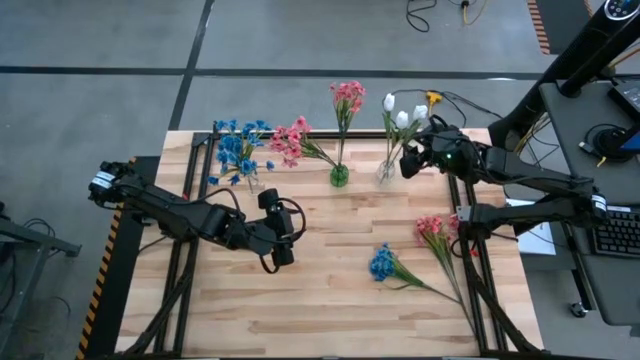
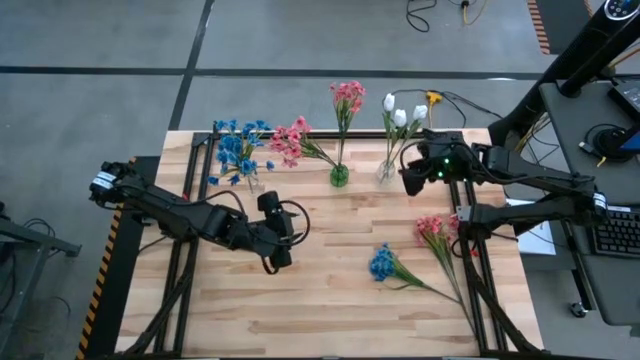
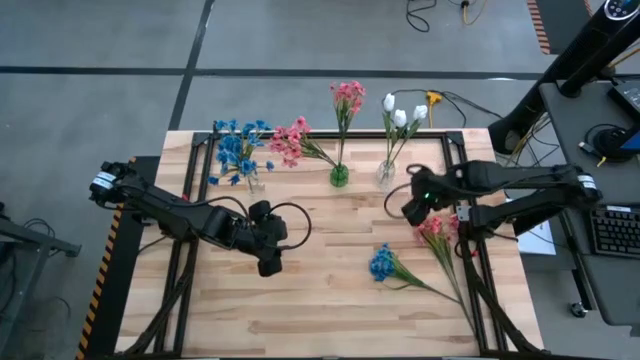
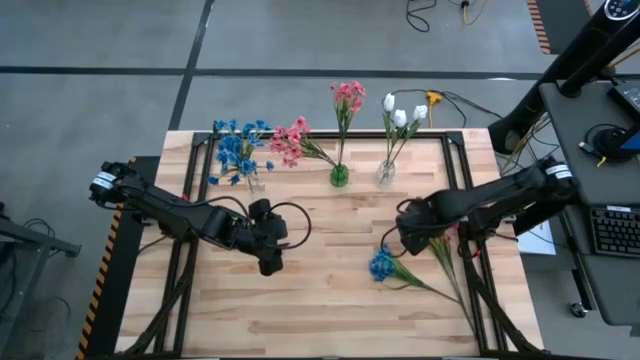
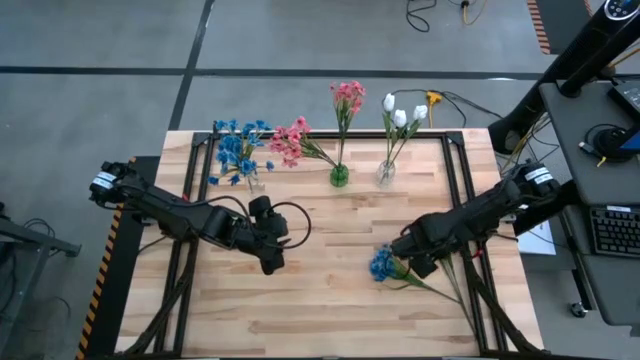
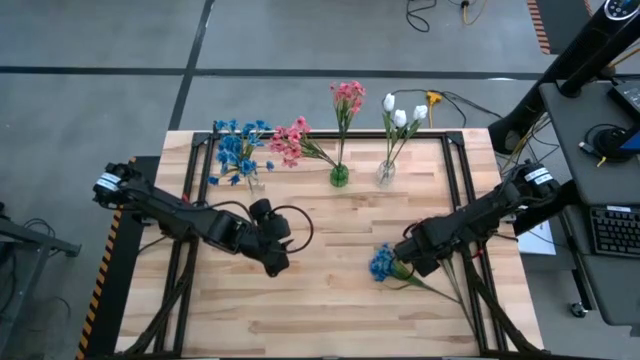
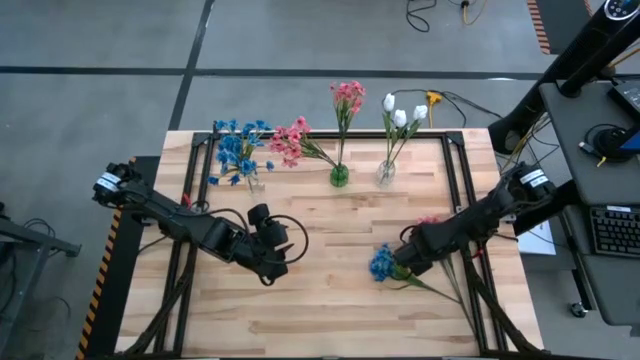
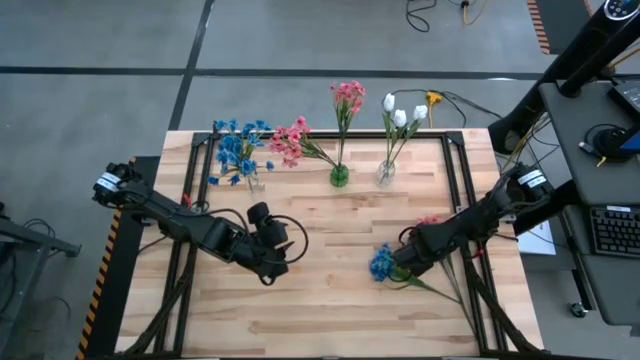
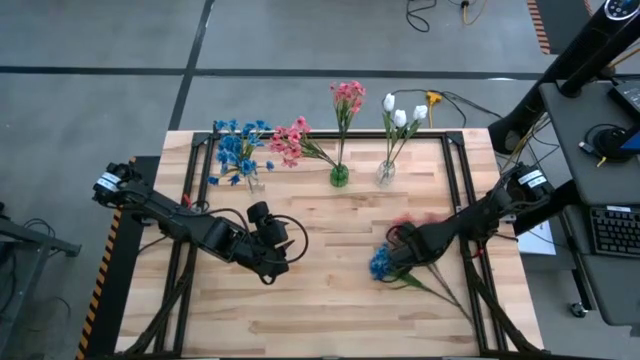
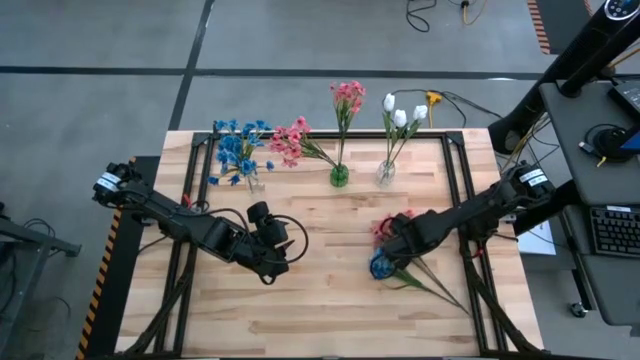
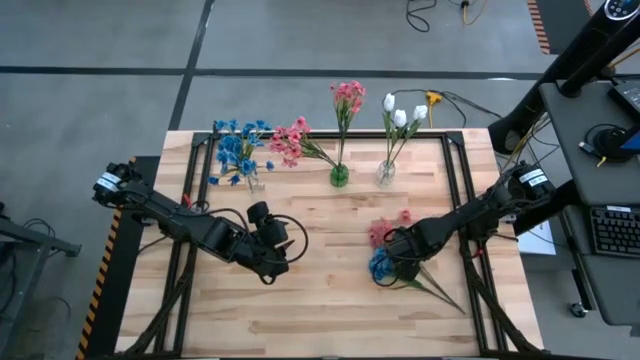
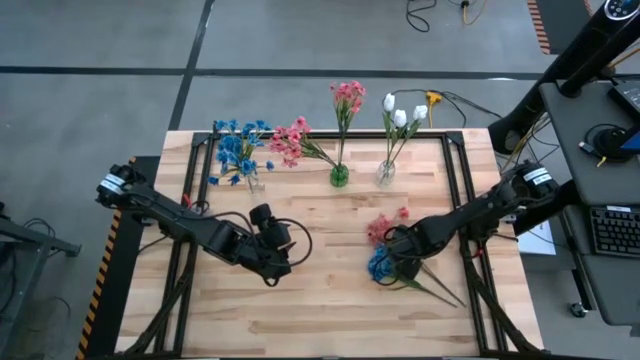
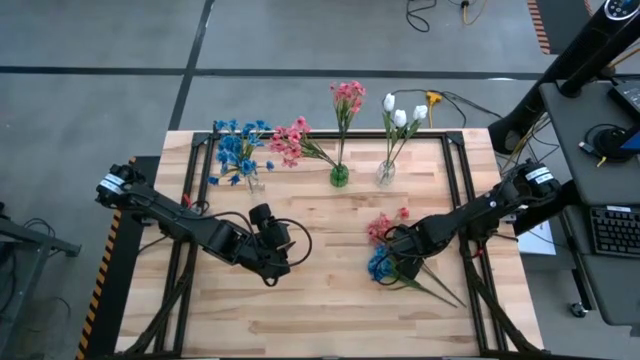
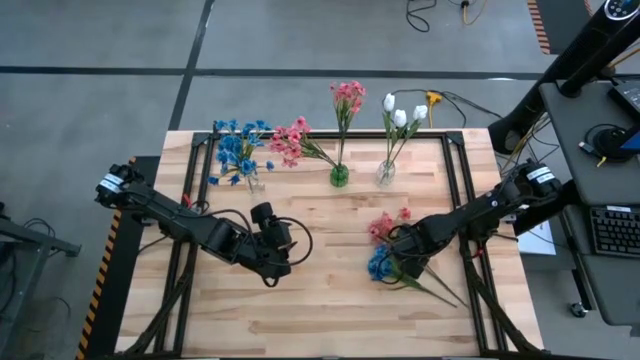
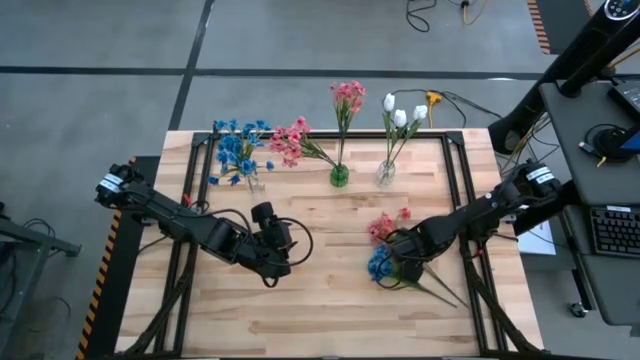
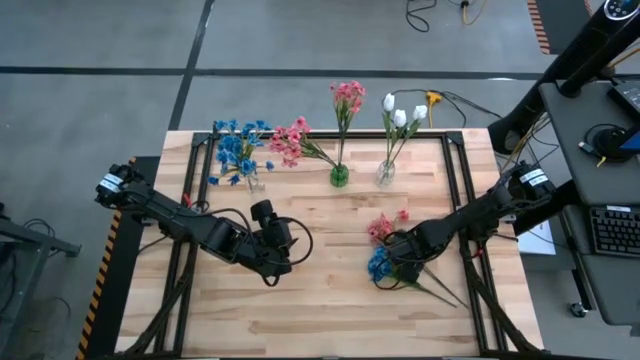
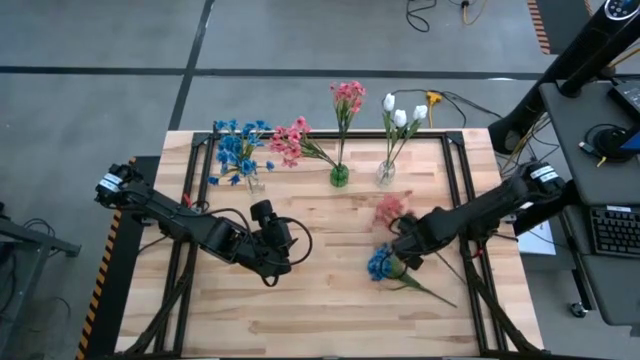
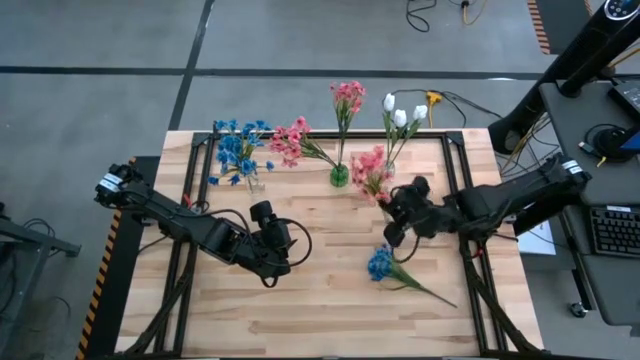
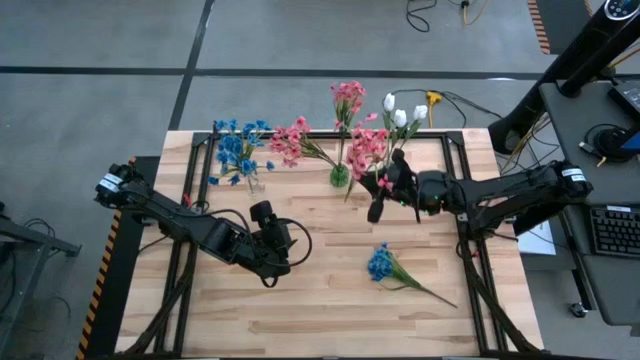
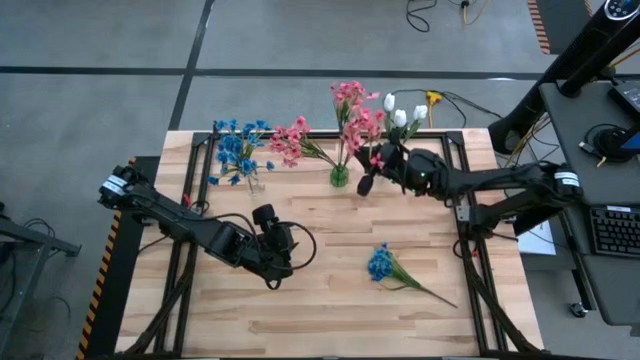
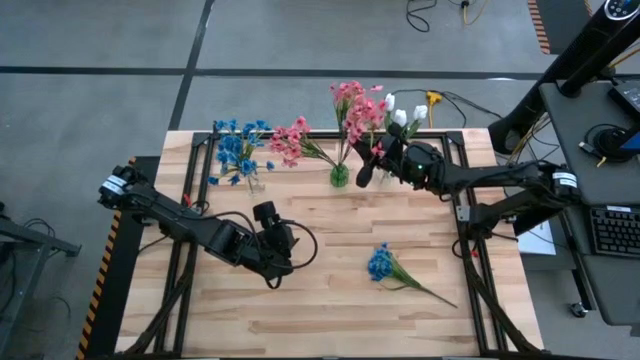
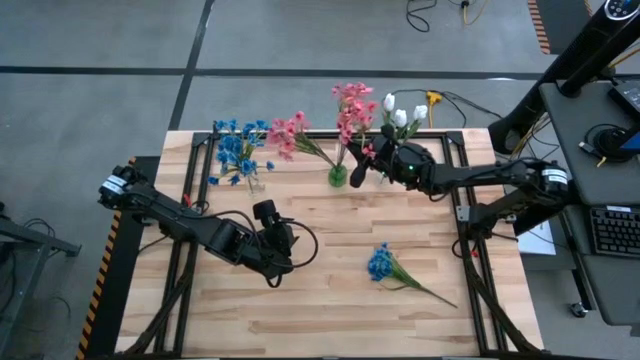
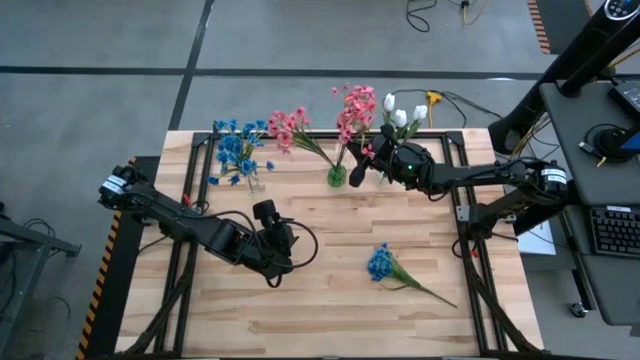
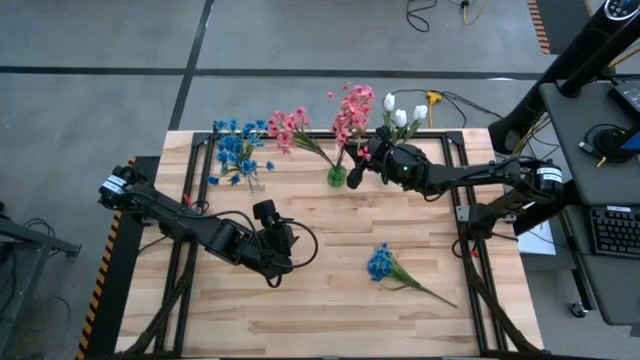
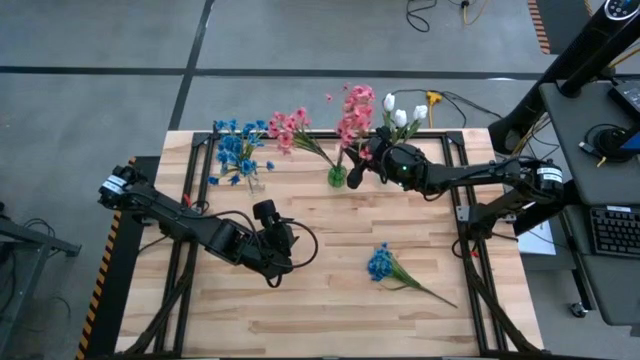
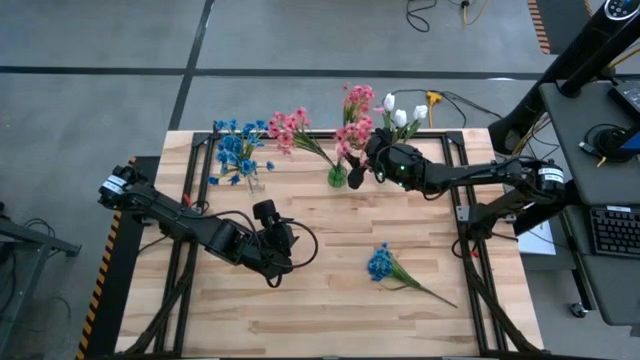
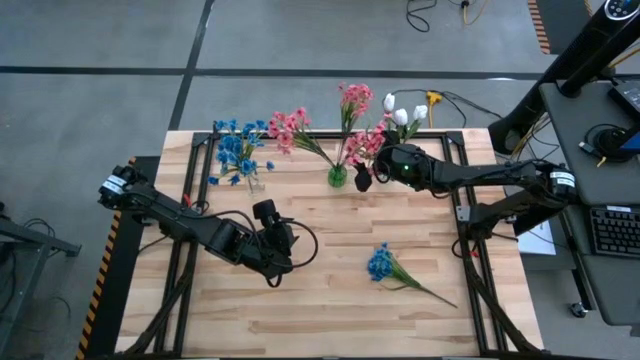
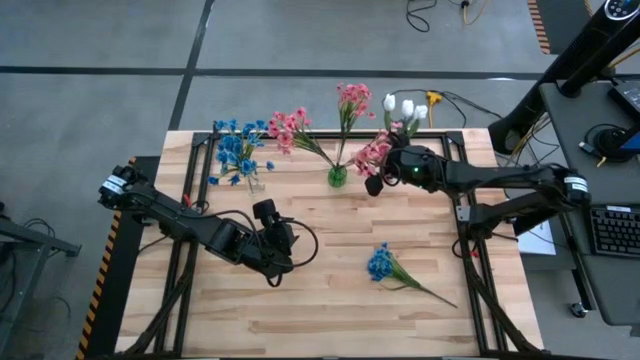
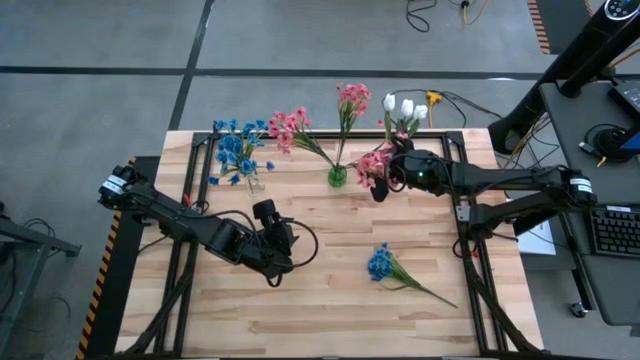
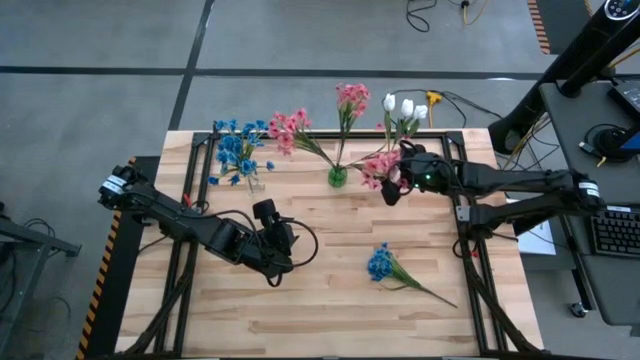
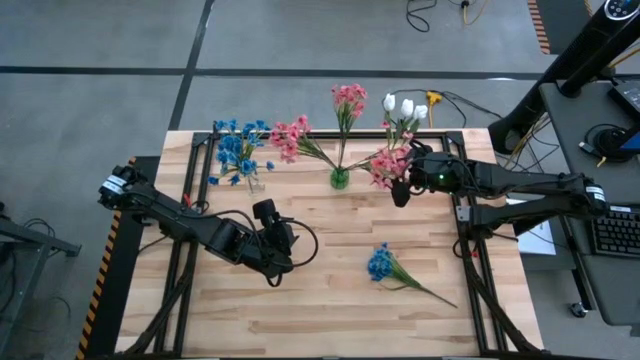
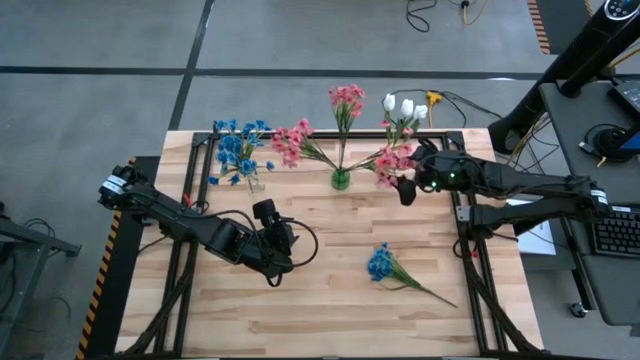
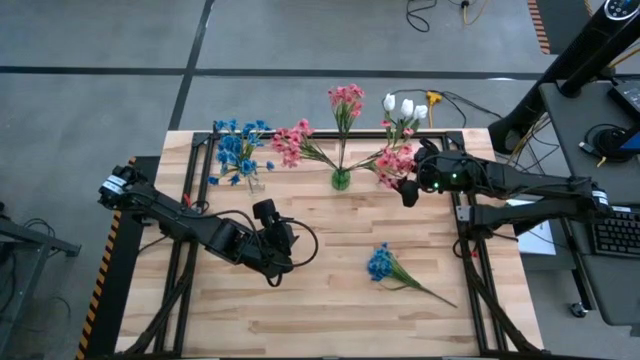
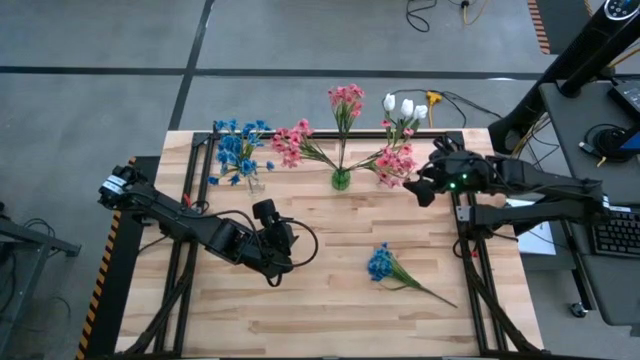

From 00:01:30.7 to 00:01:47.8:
Task: Sort flowers into vase by color
Put the pink flowers into the green vase

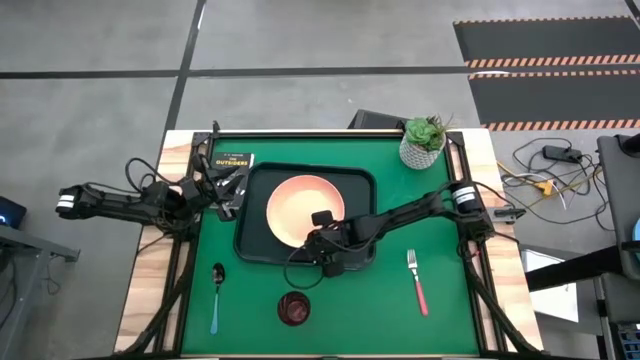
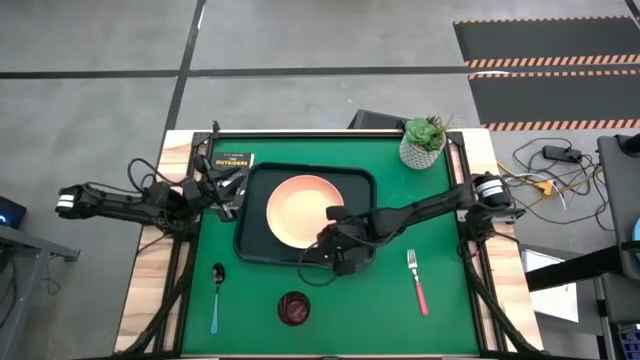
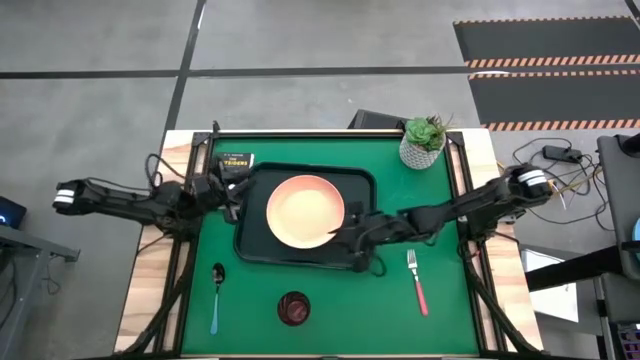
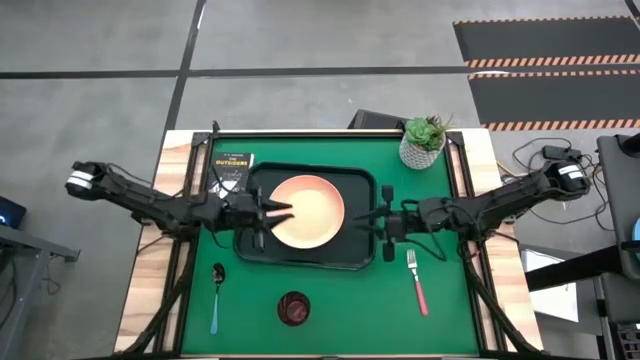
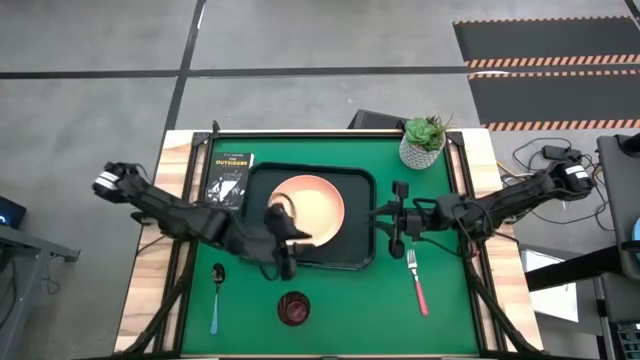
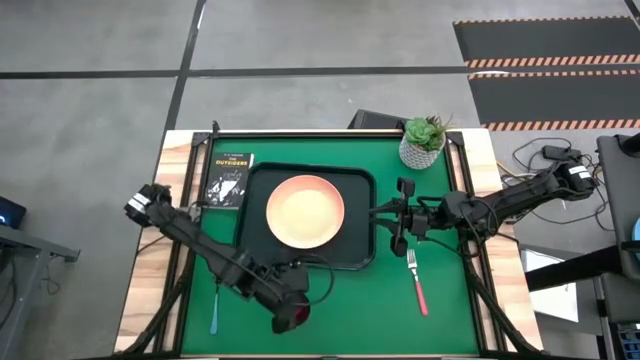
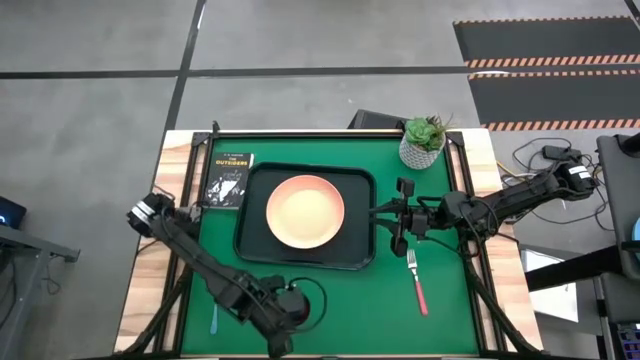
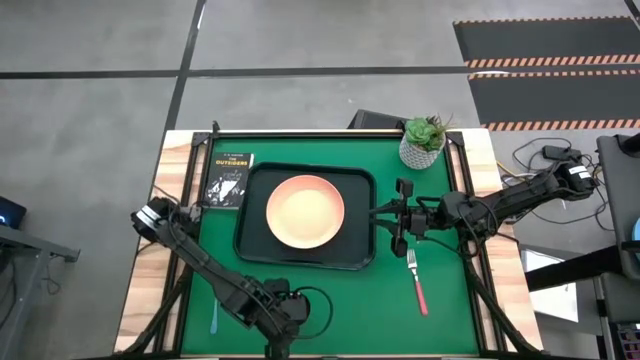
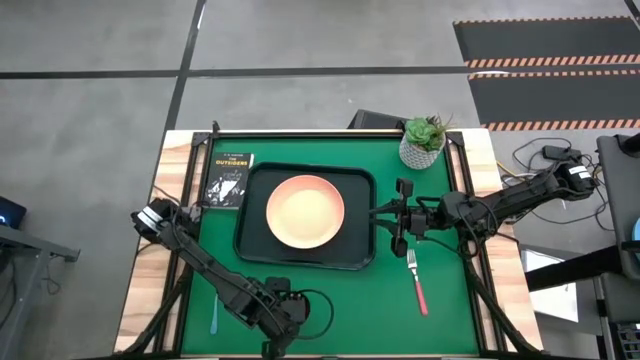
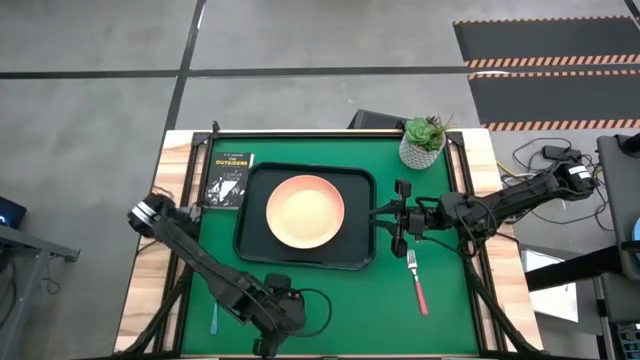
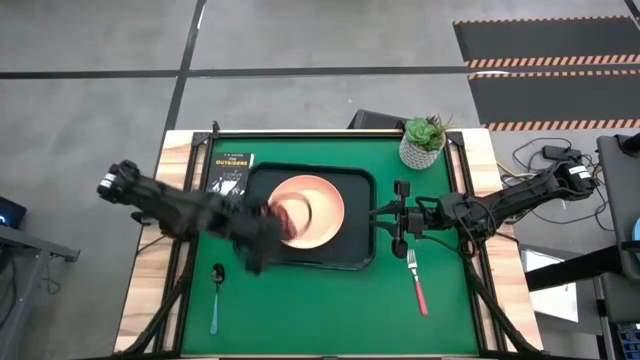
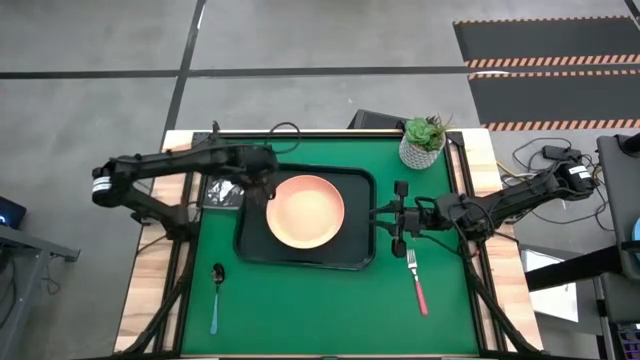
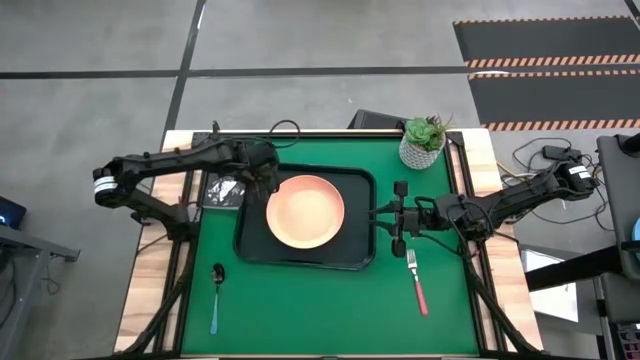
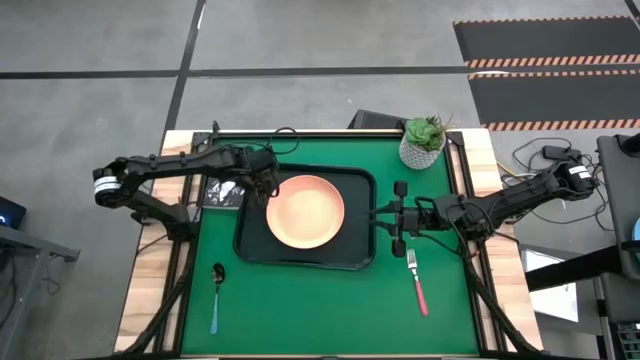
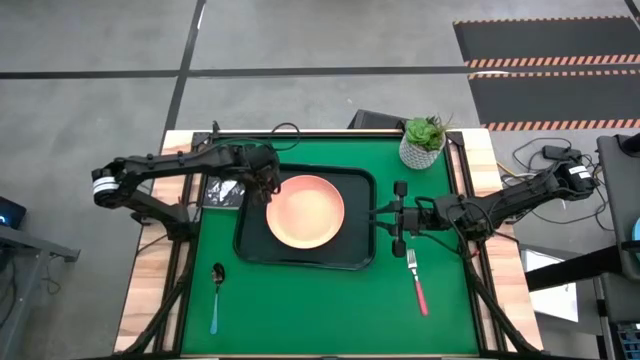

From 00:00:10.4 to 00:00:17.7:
Task: Pick and place plate/cup/fork/spoon on tray
Put the red glass on the black table tray to the top left of the orange plate
